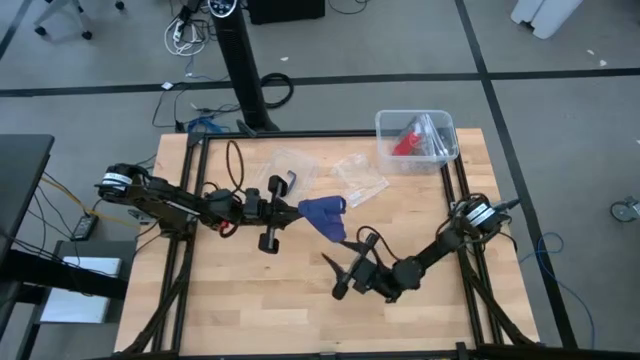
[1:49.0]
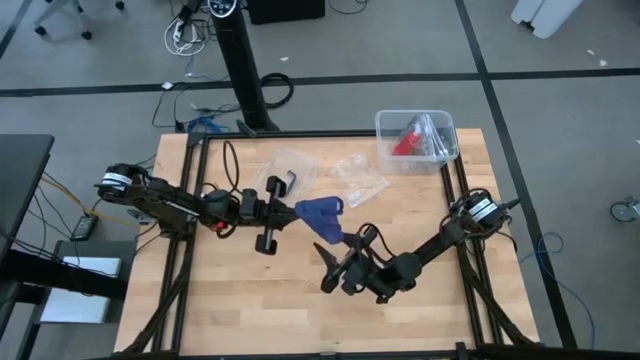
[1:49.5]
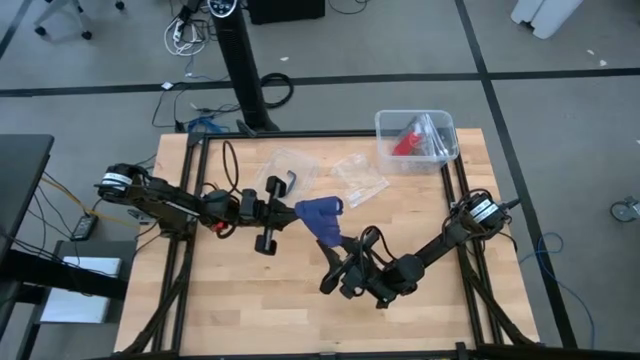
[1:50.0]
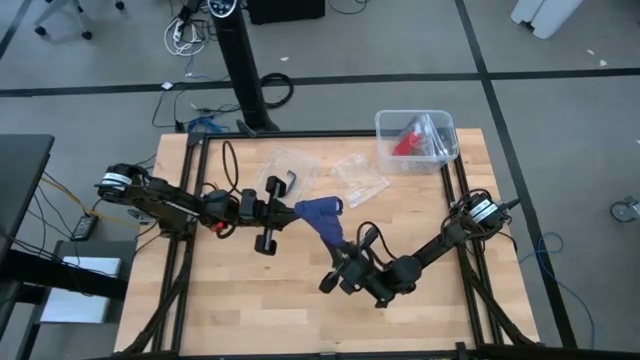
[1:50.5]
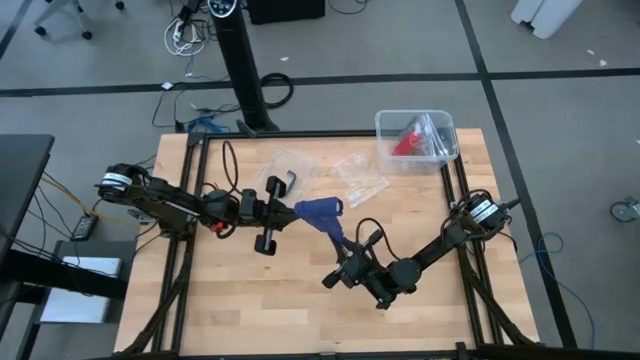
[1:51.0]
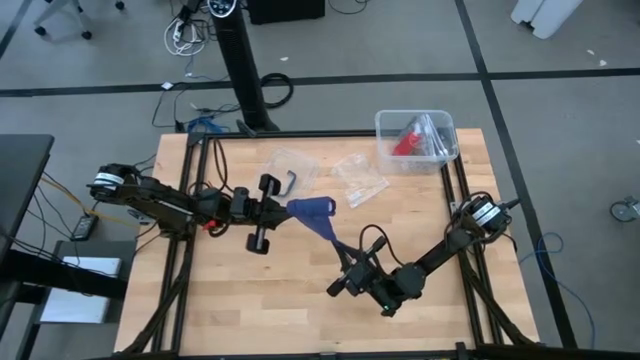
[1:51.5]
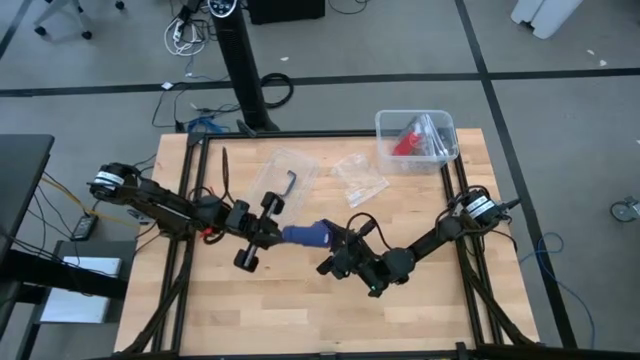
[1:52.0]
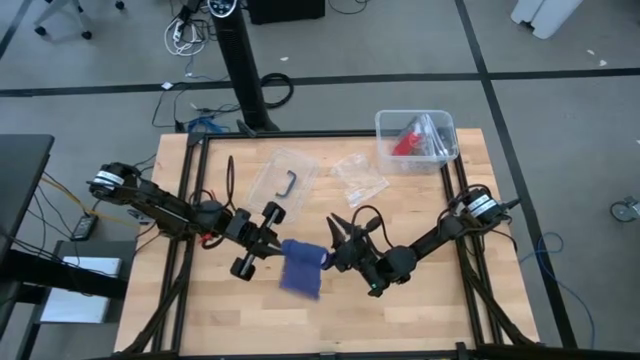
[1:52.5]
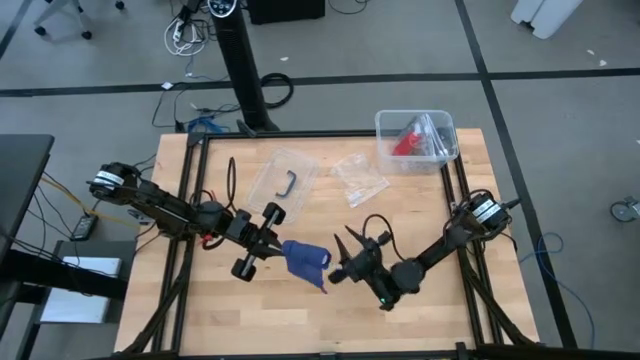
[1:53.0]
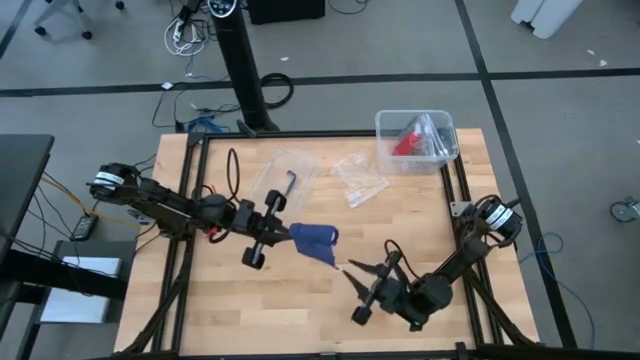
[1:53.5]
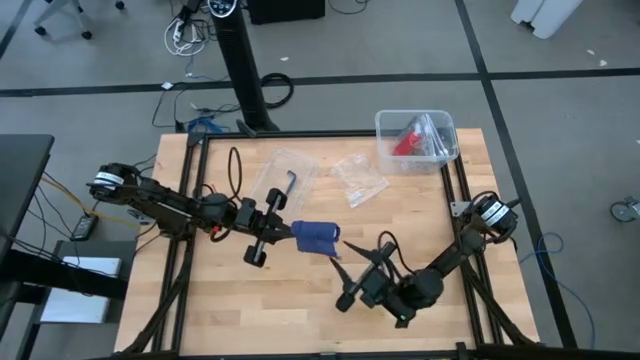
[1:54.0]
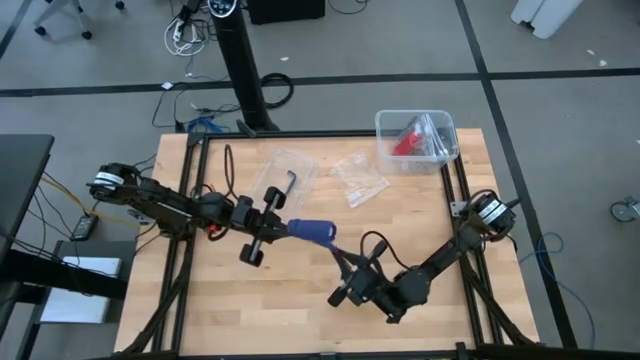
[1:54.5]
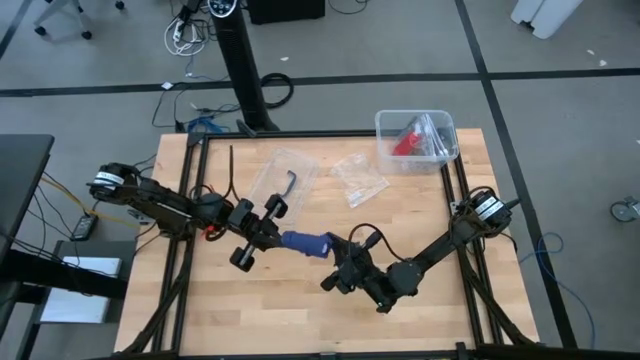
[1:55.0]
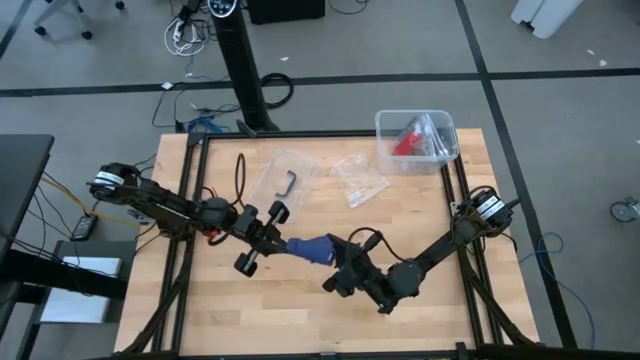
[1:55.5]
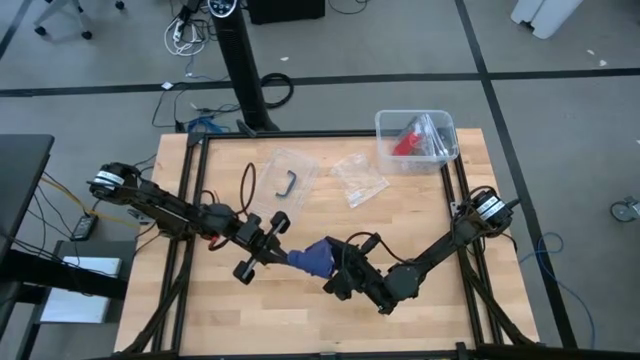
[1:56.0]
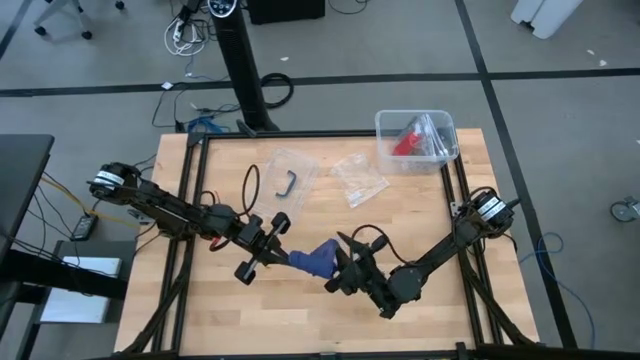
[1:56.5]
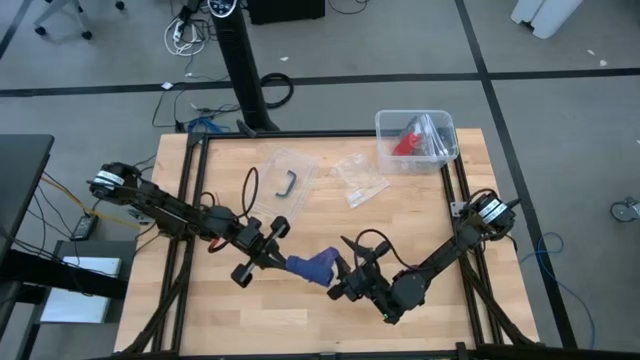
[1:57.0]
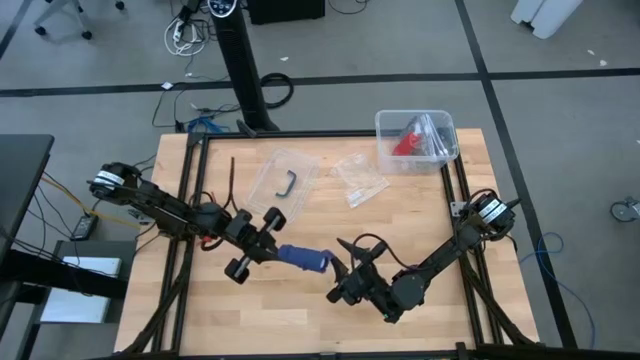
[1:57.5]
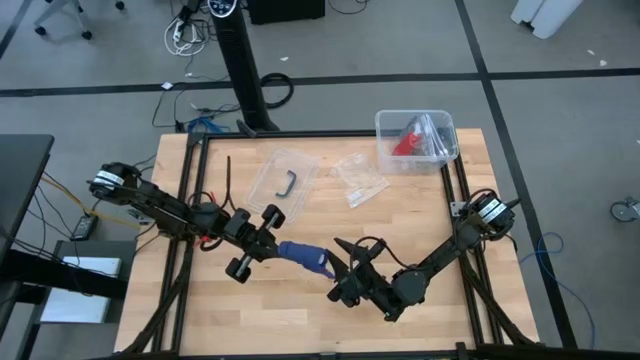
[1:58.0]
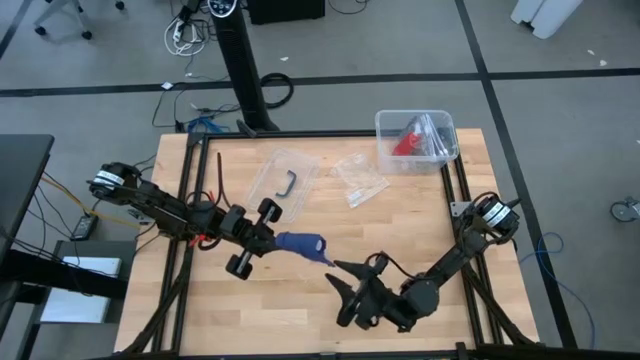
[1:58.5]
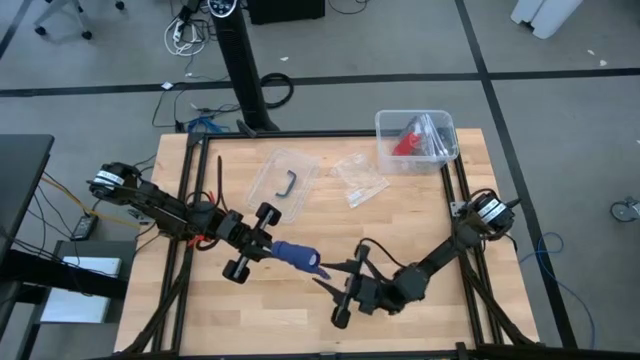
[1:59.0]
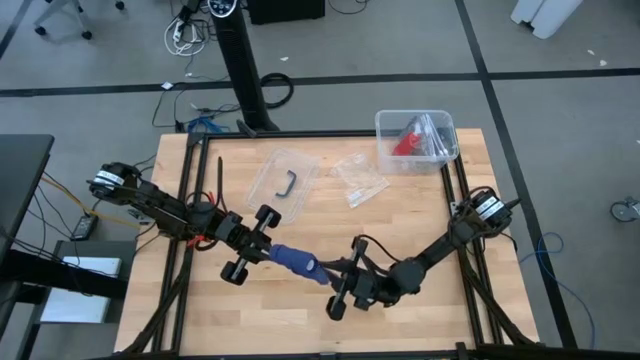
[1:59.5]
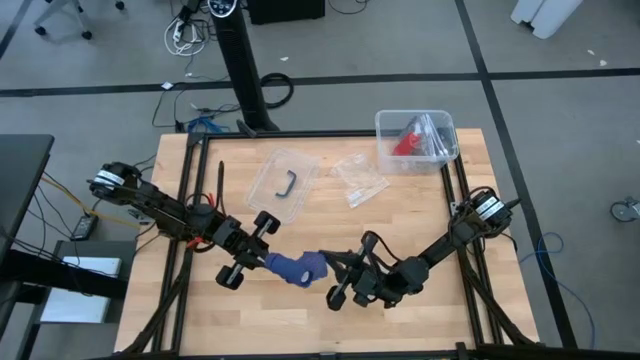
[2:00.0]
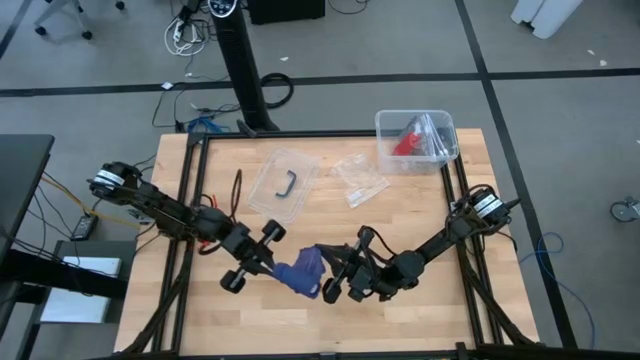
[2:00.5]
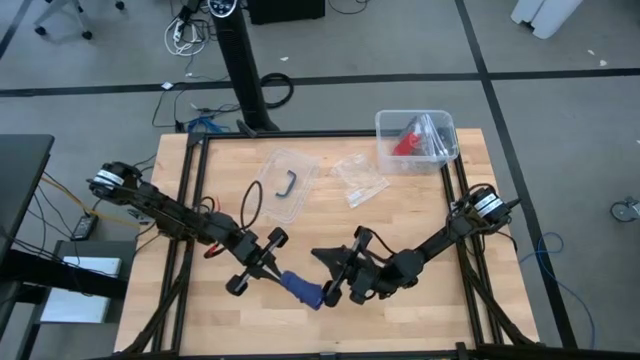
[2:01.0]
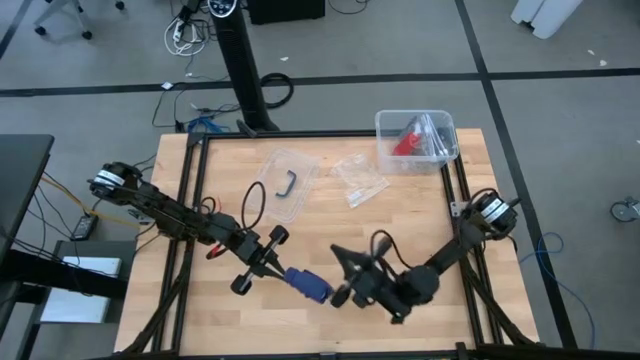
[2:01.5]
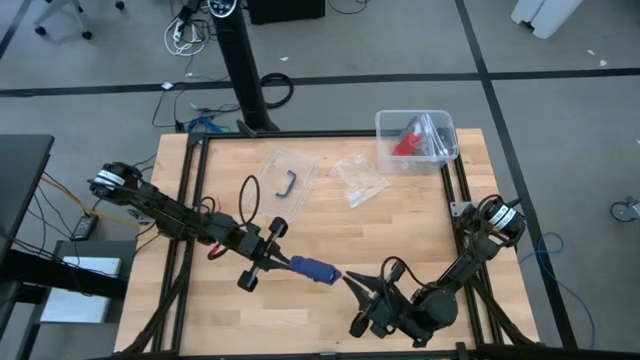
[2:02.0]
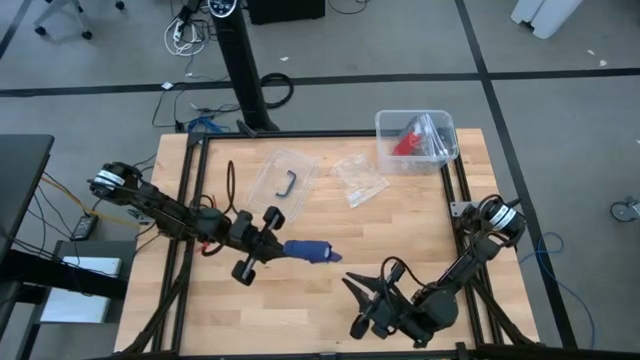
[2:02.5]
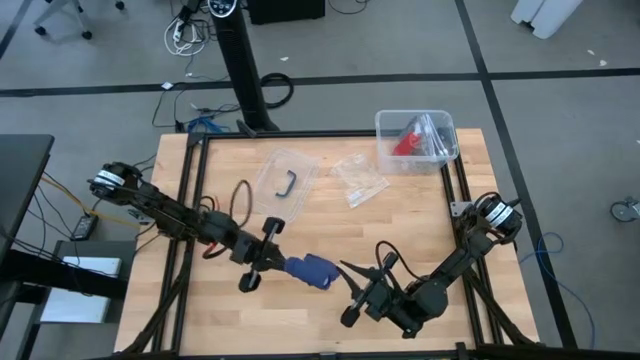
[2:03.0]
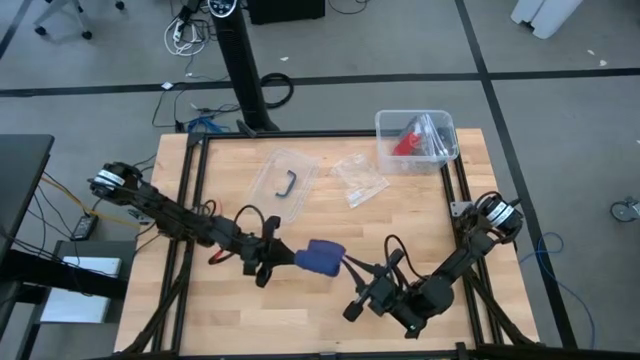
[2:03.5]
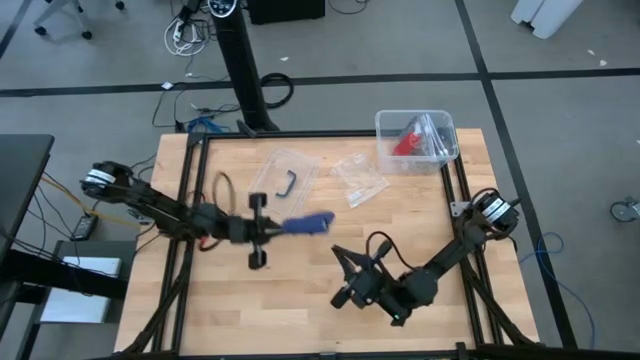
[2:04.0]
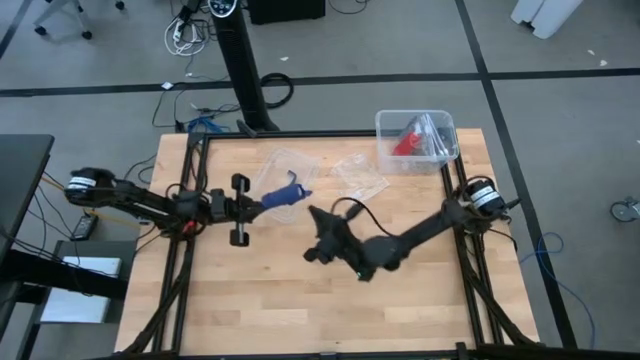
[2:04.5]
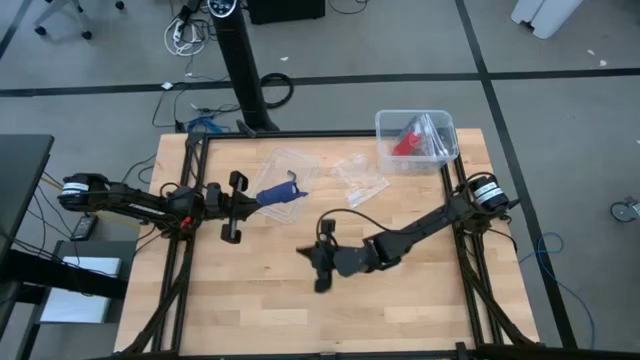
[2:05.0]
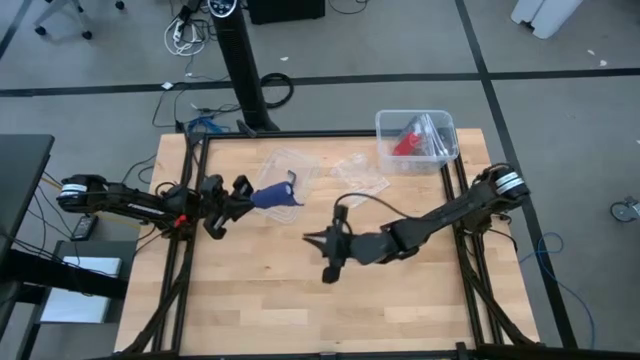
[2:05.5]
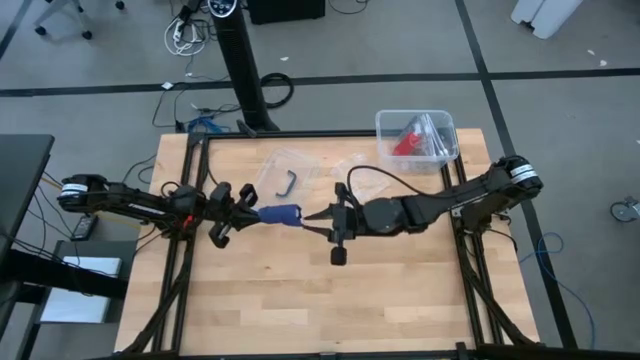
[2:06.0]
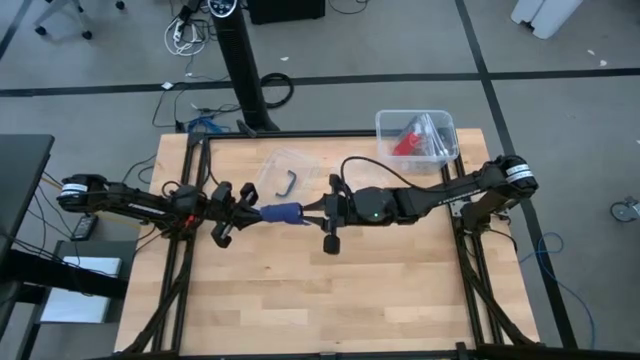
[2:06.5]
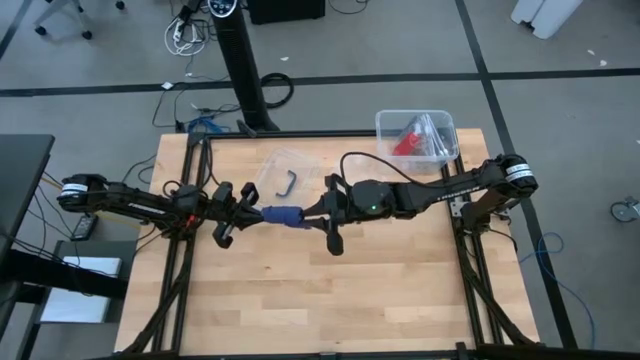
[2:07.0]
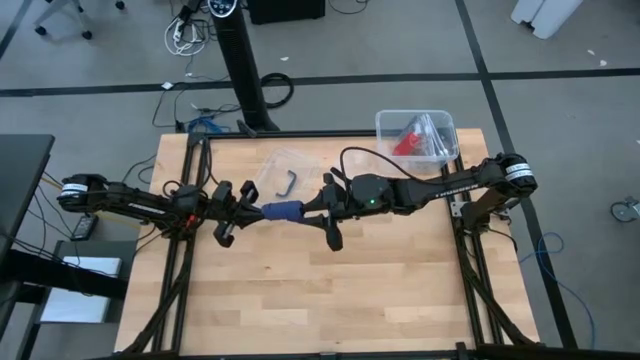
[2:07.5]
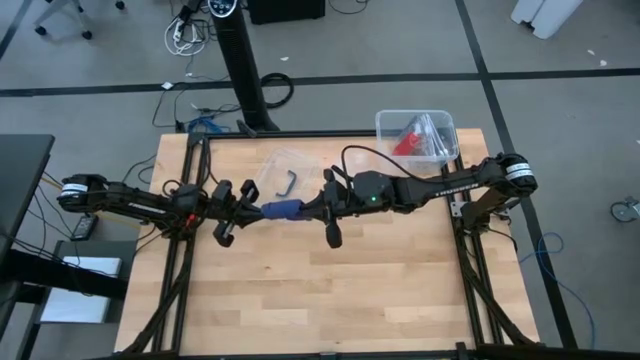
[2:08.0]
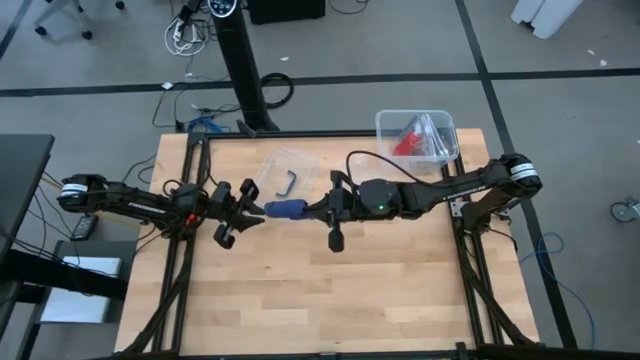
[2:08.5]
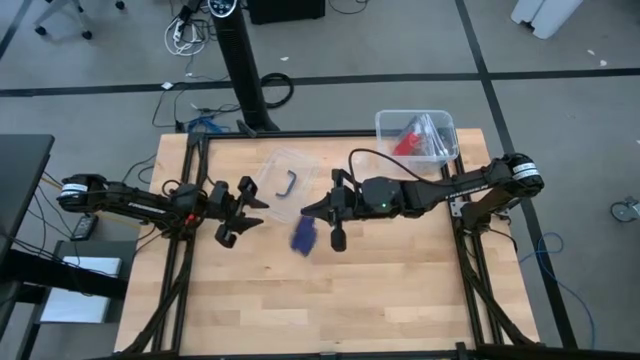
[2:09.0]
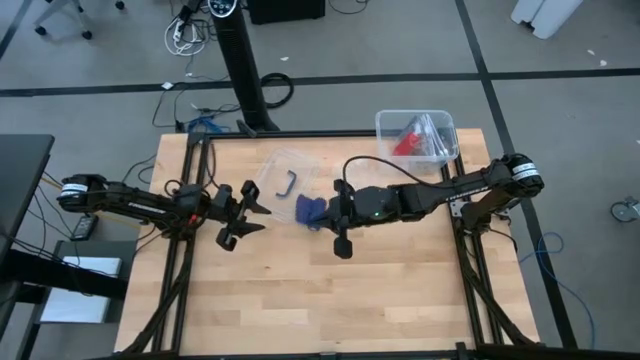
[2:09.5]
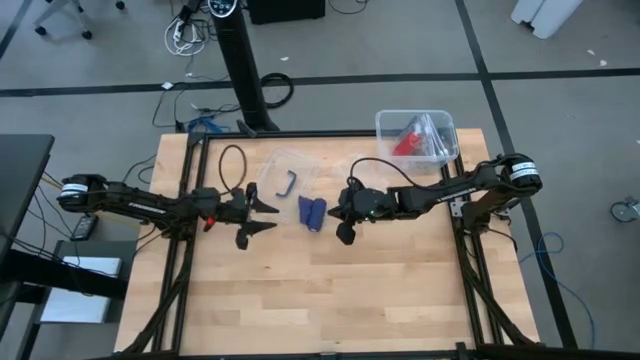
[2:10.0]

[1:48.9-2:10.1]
Task: Roll bandage
Roll the blue bandage
